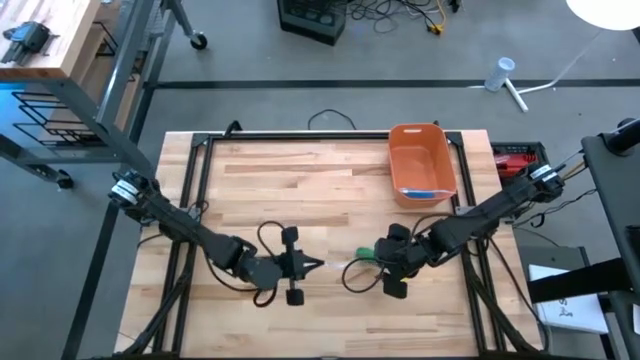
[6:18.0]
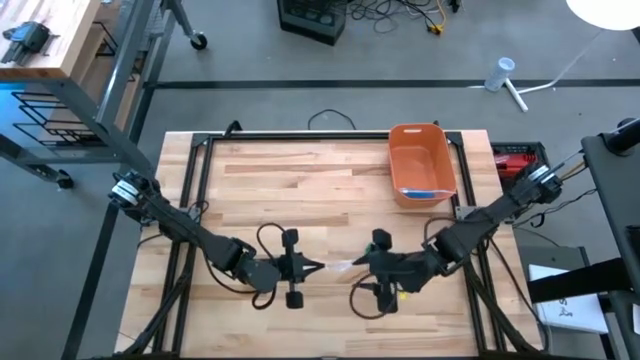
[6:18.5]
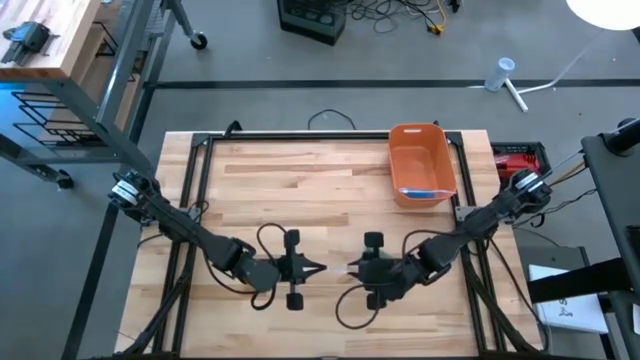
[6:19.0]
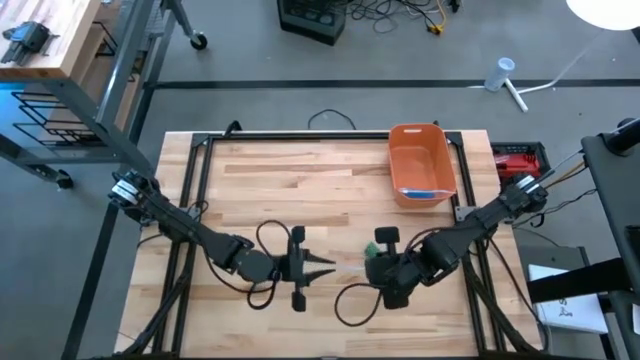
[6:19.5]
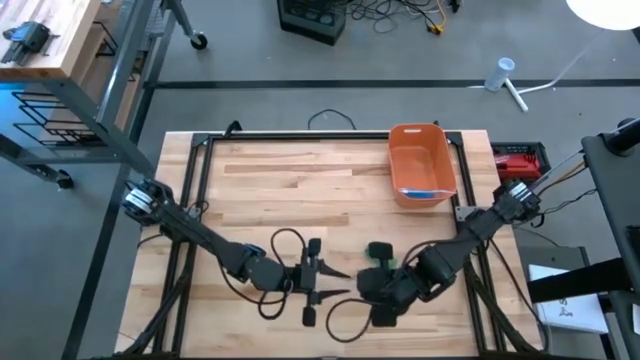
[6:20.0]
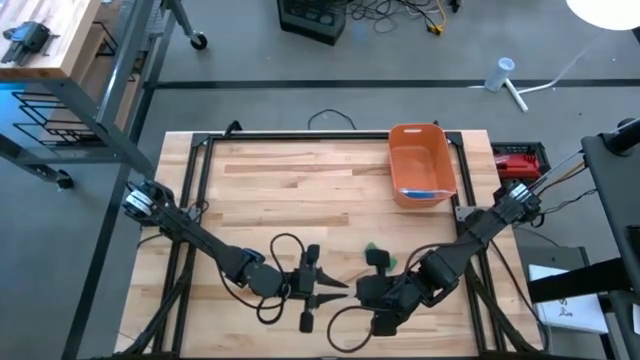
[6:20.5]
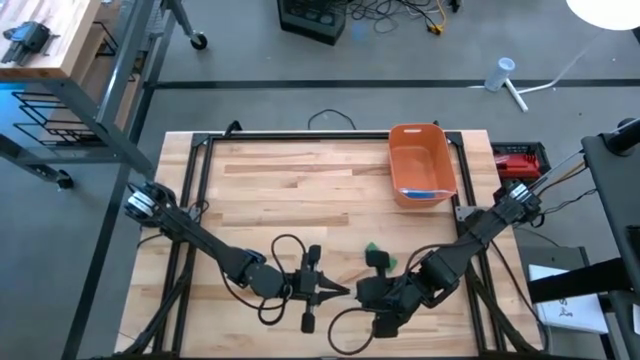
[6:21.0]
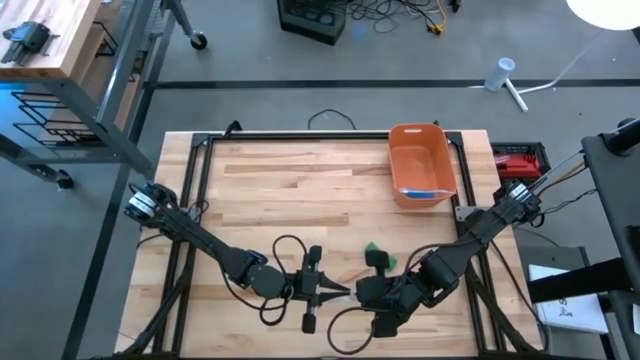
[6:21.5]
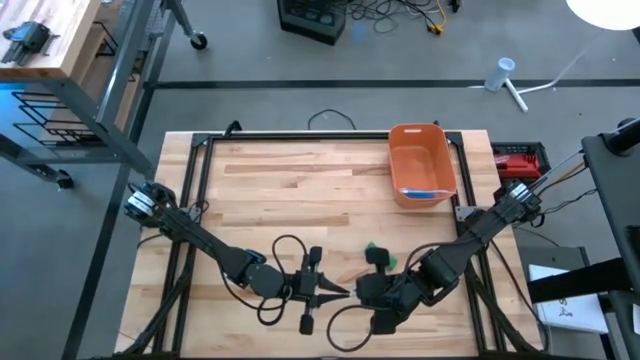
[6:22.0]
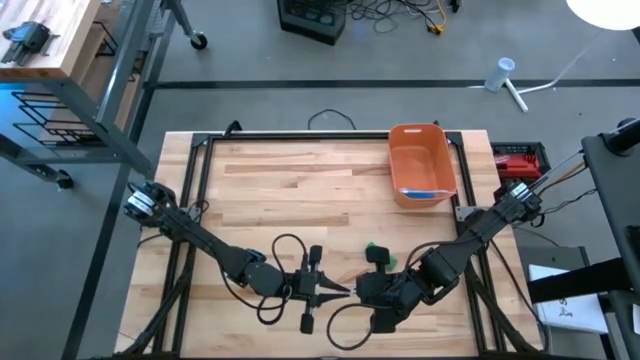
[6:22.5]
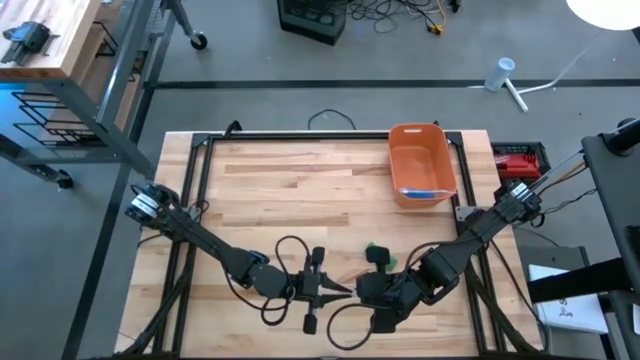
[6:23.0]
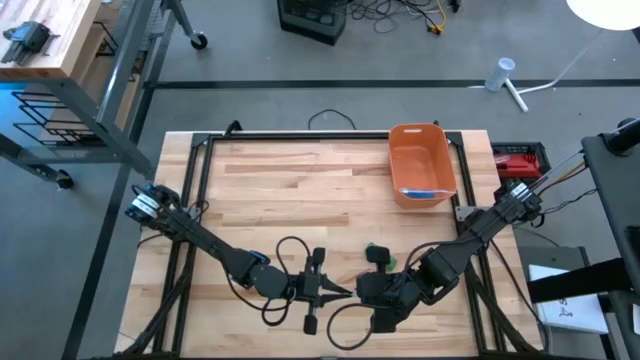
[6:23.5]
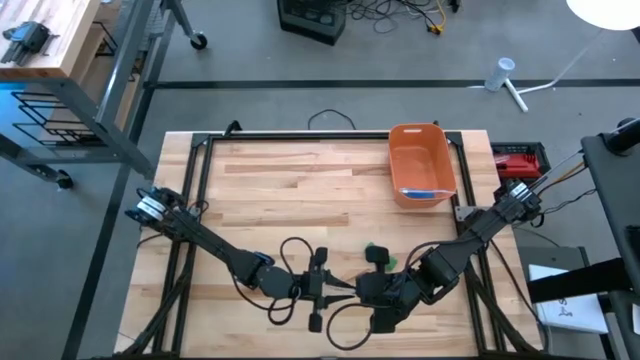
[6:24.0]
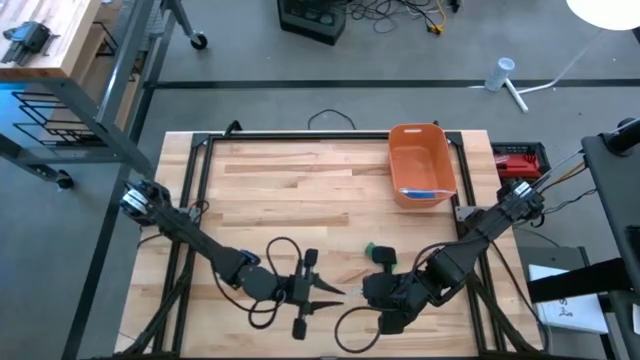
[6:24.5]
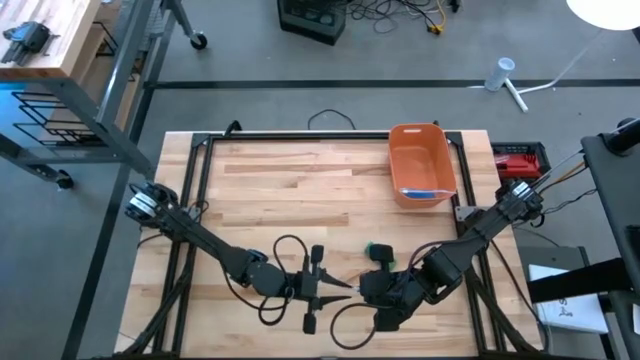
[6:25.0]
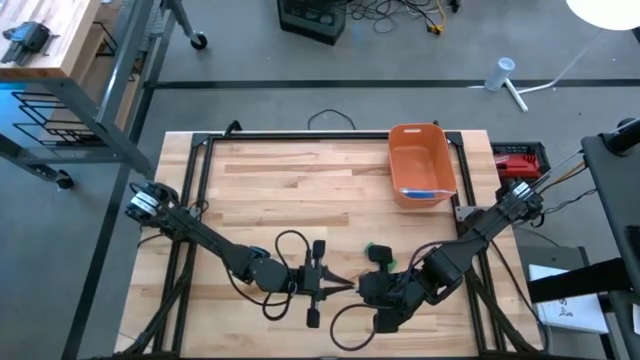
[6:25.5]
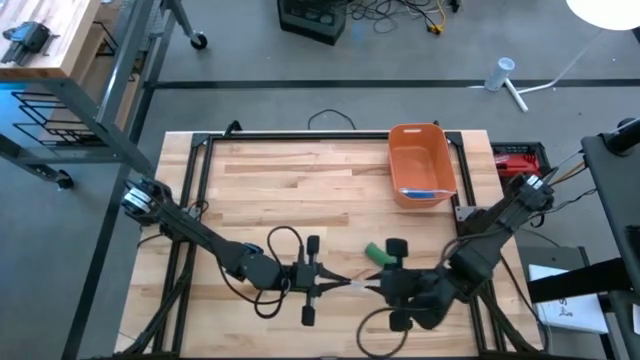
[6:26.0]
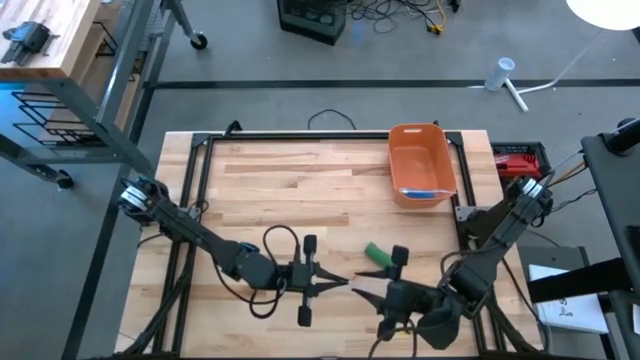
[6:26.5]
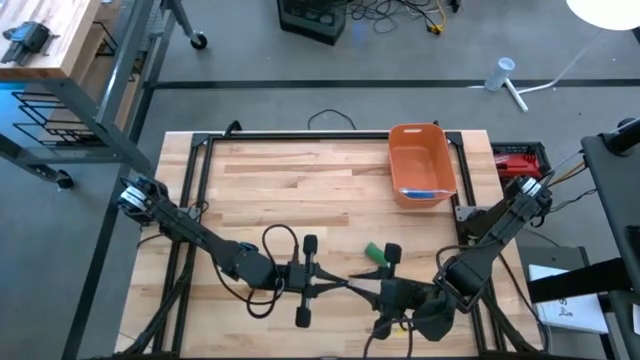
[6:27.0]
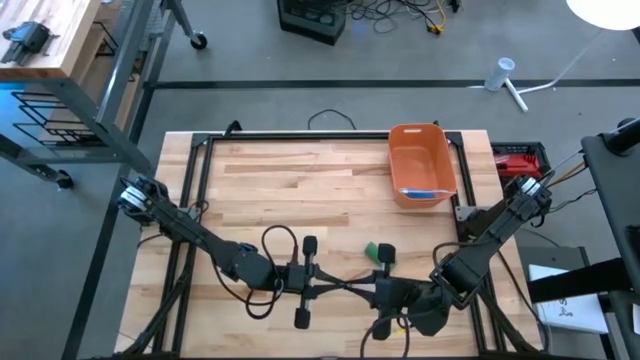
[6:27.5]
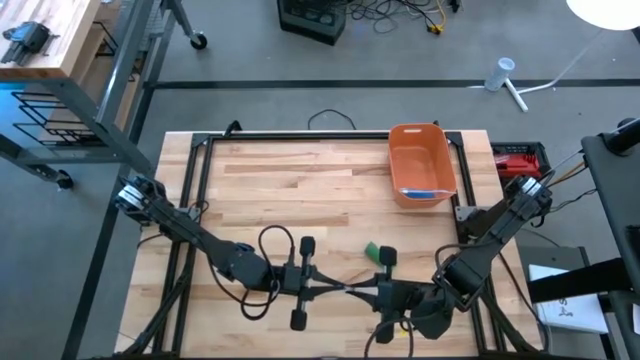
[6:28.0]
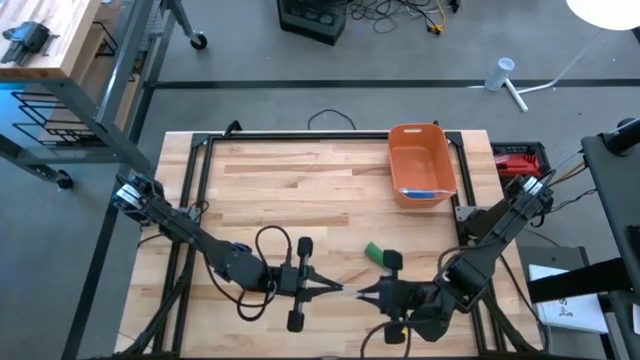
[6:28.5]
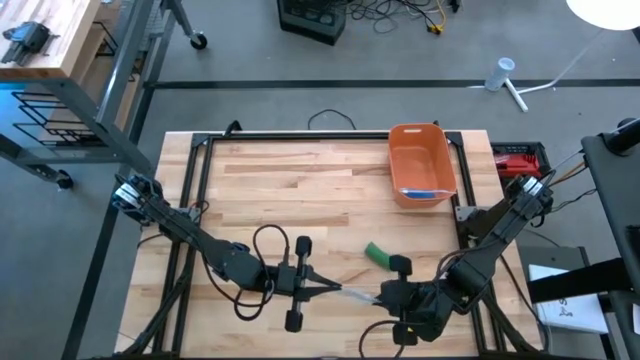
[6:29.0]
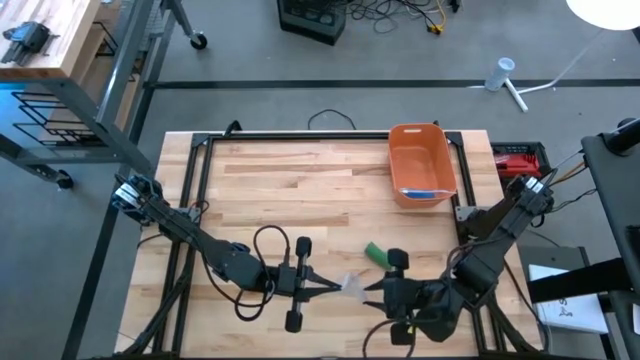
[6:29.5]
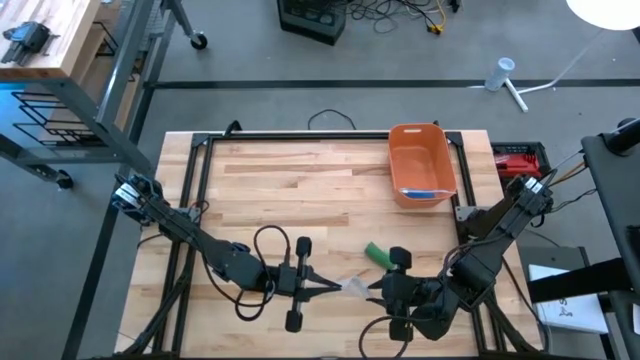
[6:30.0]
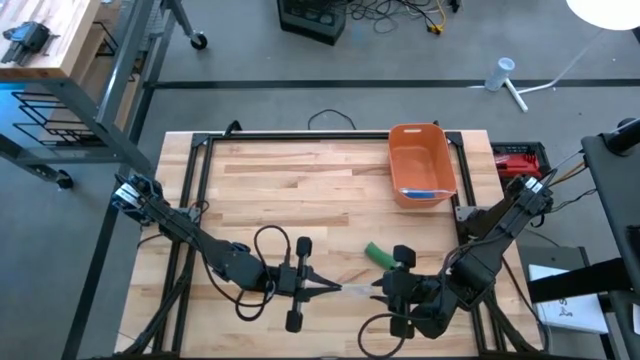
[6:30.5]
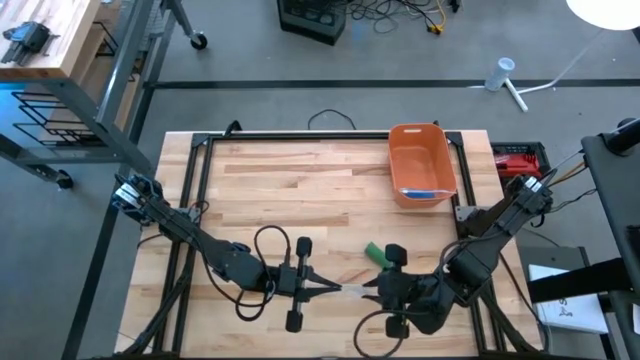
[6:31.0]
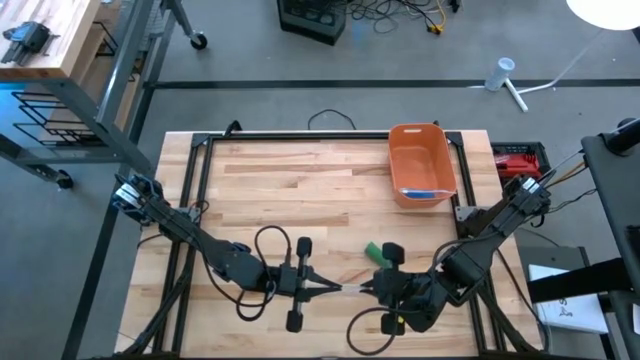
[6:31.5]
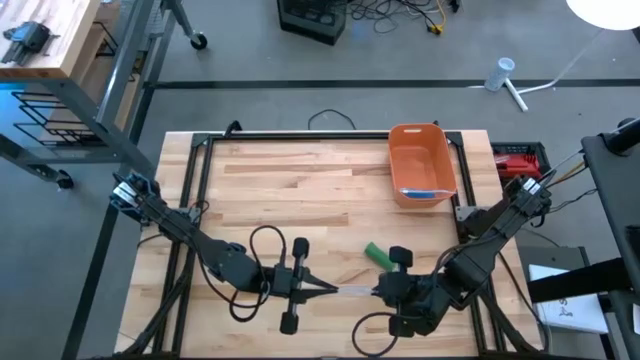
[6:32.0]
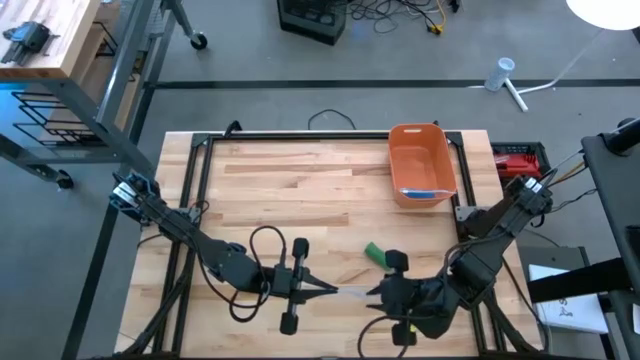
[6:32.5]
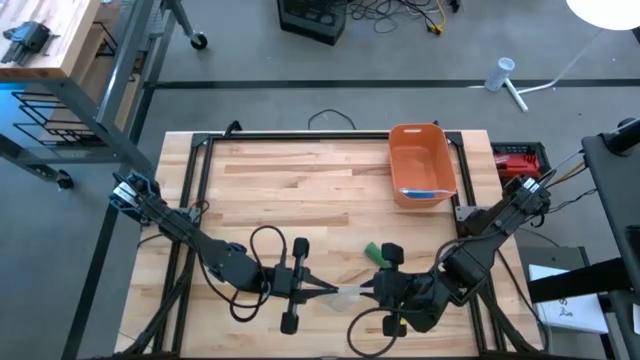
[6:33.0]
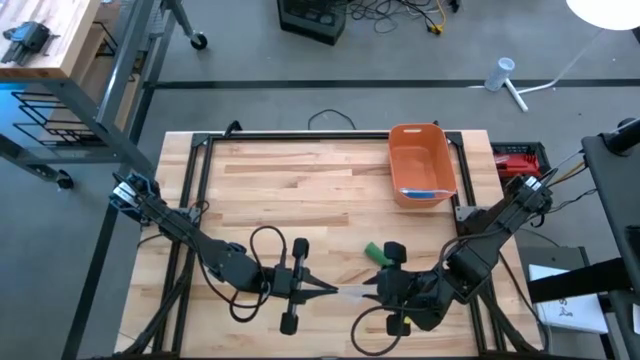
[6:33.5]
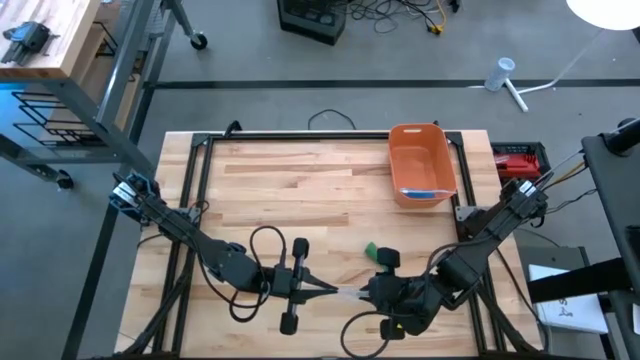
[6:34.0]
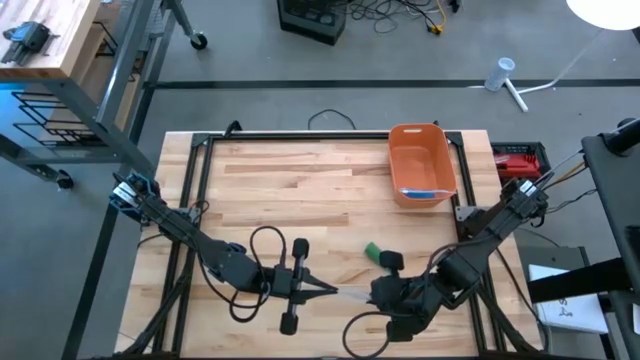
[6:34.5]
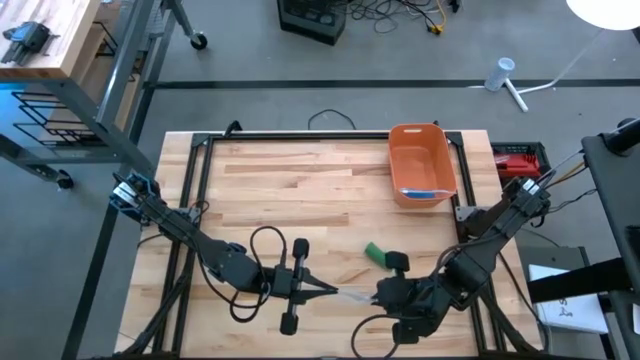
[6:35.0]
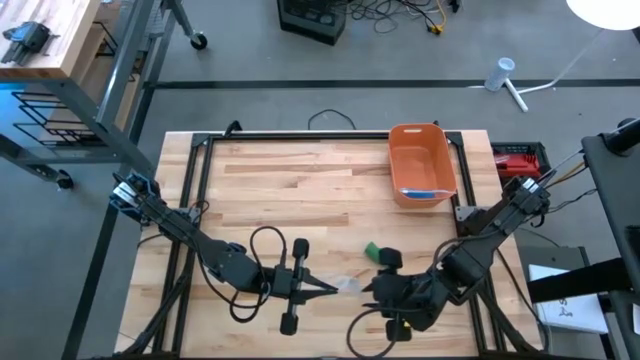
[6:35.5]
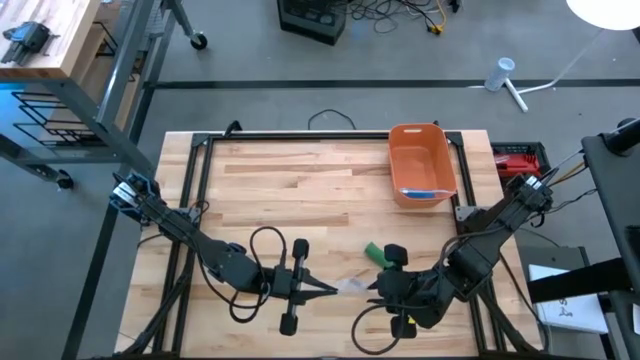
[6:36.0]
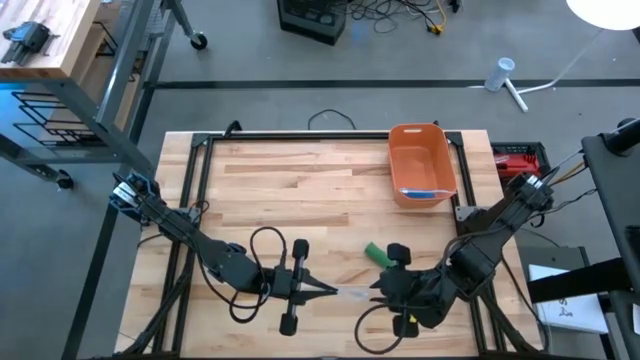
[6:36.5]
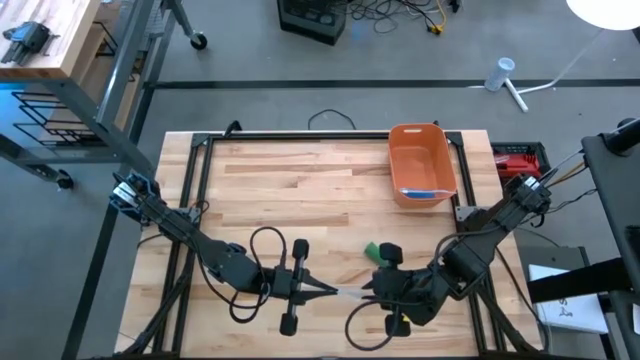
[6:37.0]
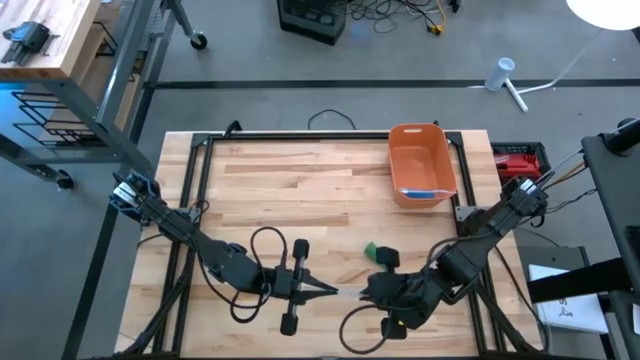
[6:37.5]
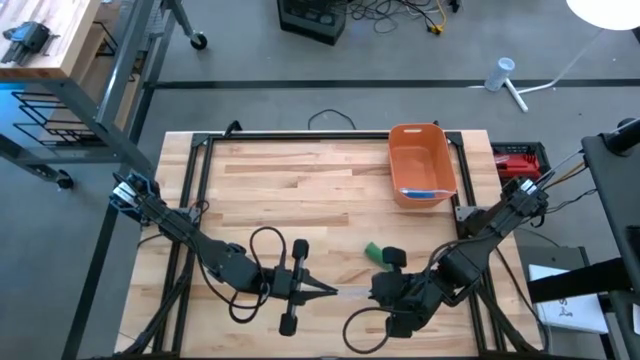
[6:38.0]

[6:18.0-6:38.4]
Task: Roll bandage
Open the transparent zip bag
